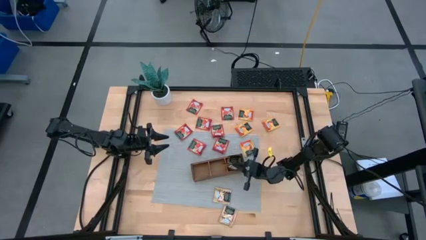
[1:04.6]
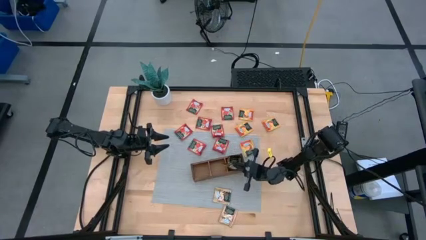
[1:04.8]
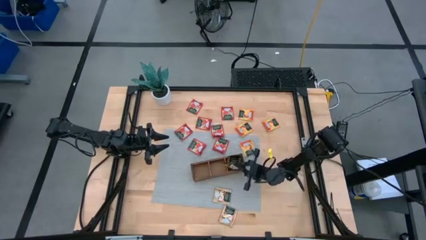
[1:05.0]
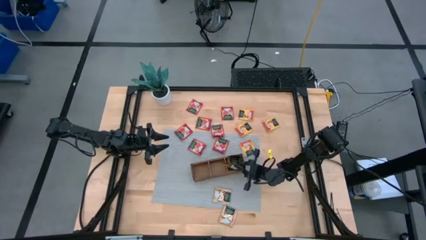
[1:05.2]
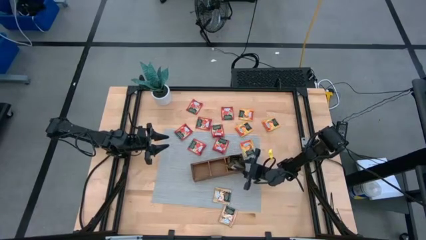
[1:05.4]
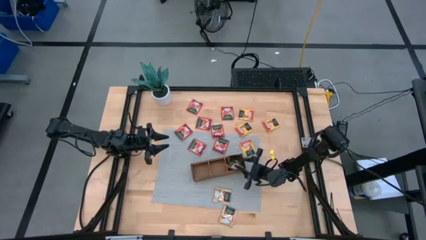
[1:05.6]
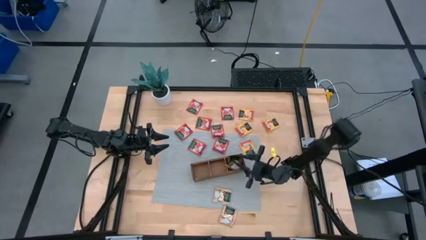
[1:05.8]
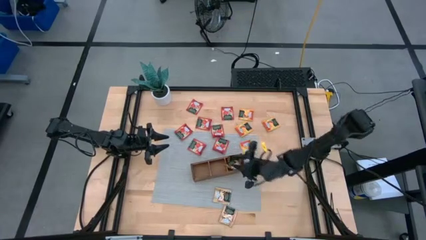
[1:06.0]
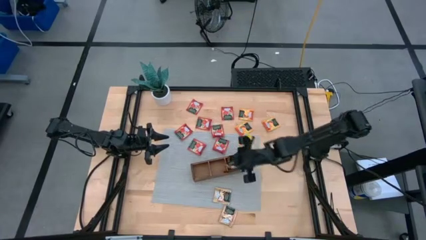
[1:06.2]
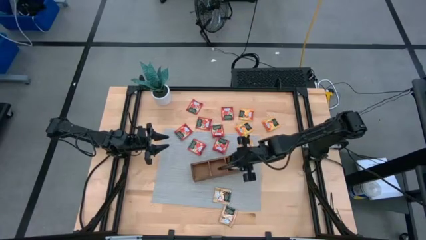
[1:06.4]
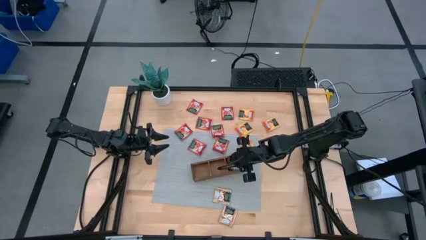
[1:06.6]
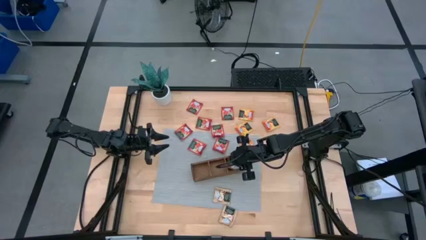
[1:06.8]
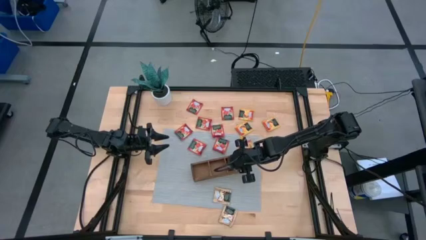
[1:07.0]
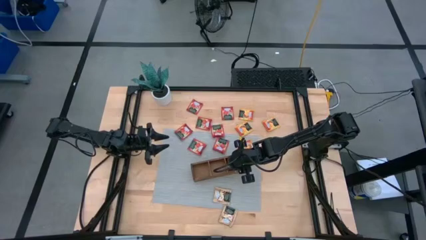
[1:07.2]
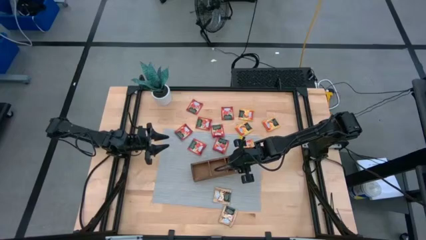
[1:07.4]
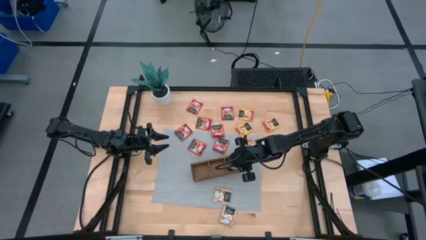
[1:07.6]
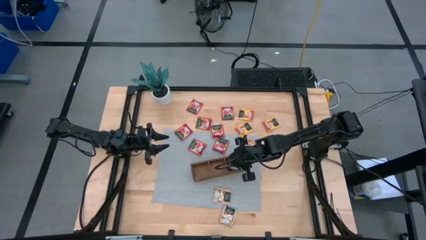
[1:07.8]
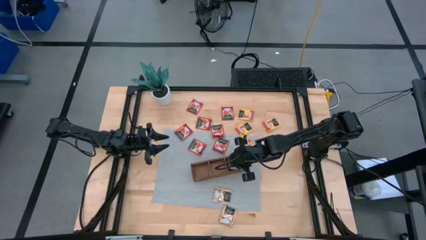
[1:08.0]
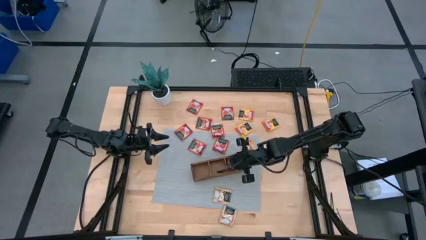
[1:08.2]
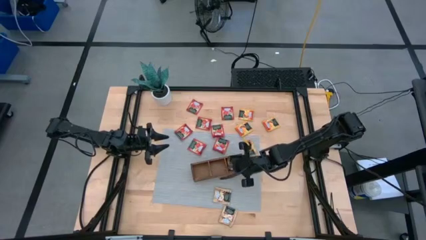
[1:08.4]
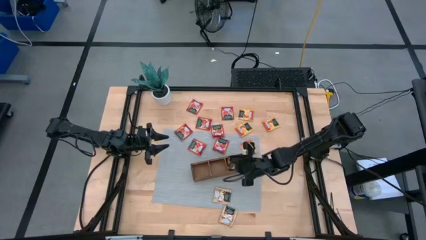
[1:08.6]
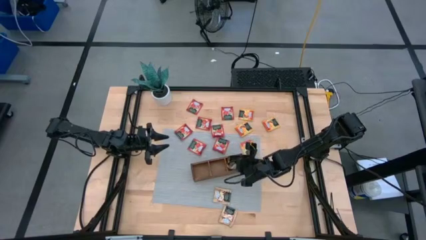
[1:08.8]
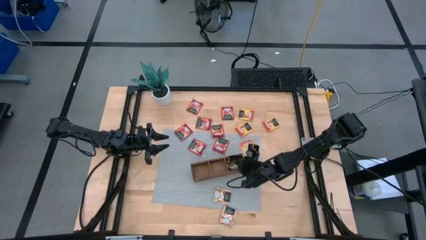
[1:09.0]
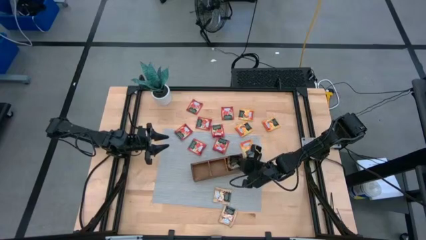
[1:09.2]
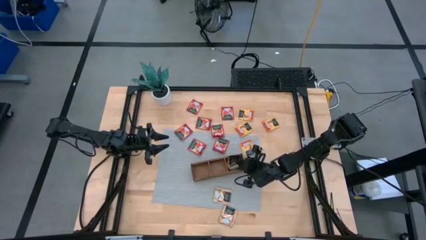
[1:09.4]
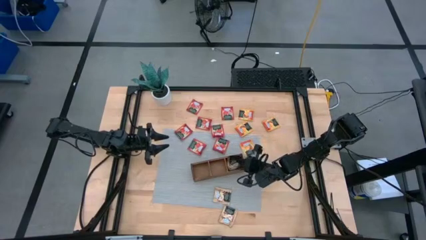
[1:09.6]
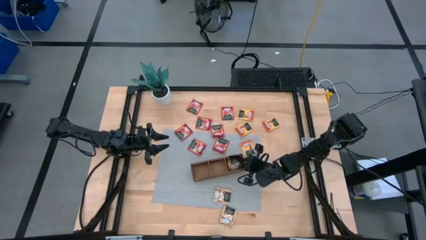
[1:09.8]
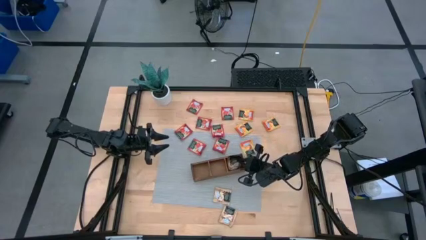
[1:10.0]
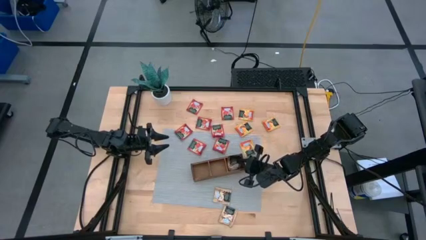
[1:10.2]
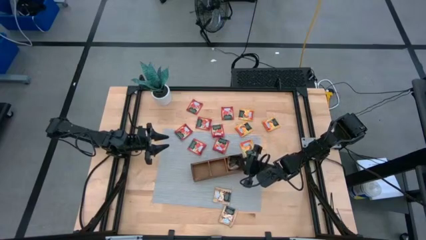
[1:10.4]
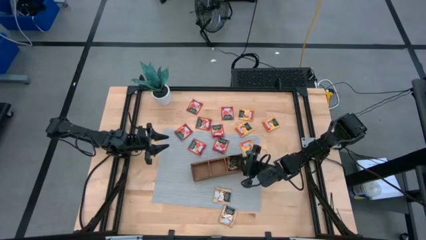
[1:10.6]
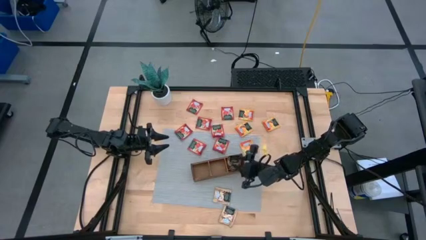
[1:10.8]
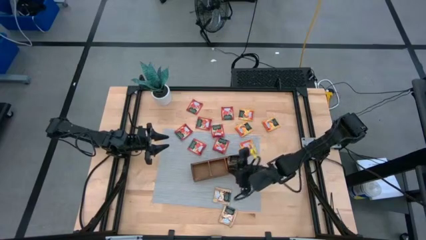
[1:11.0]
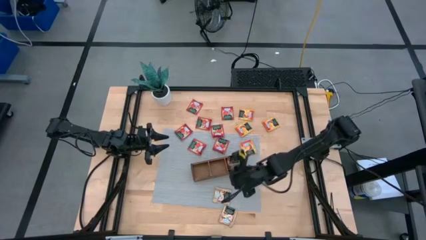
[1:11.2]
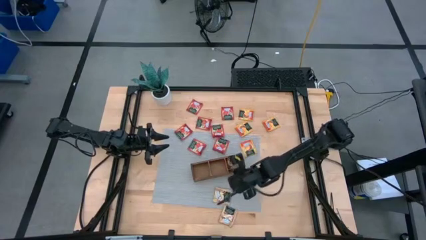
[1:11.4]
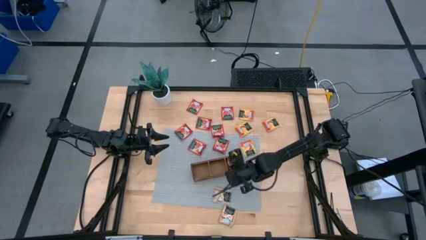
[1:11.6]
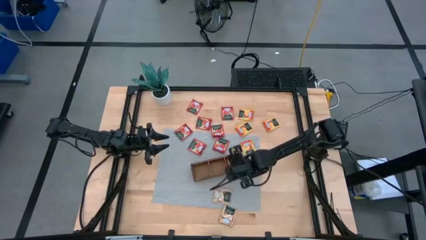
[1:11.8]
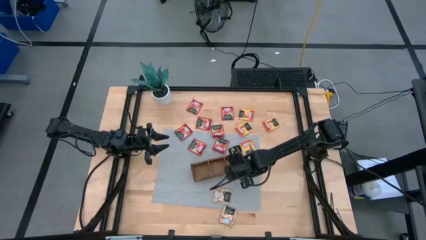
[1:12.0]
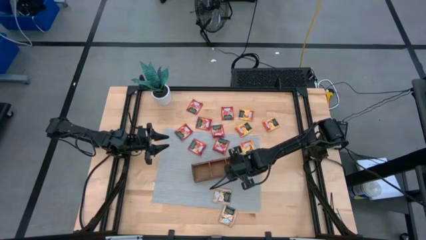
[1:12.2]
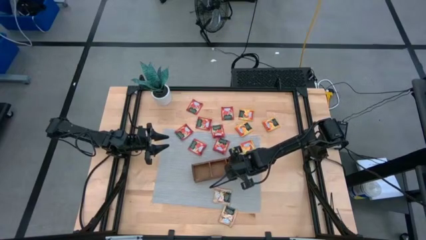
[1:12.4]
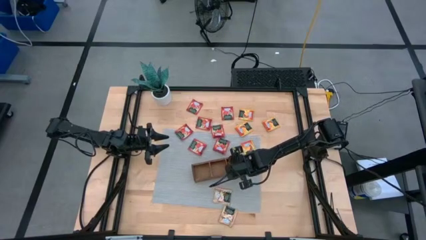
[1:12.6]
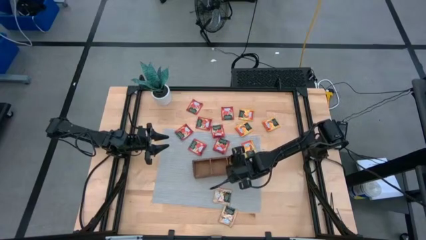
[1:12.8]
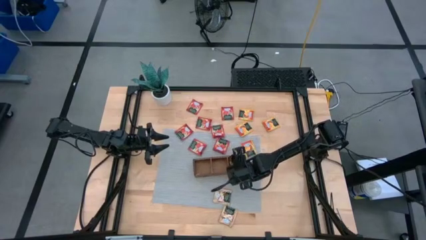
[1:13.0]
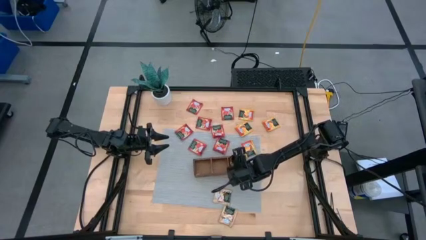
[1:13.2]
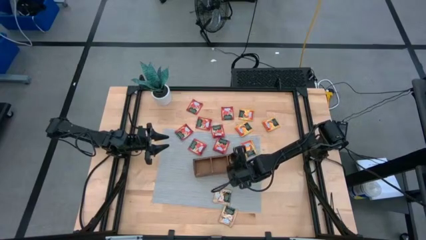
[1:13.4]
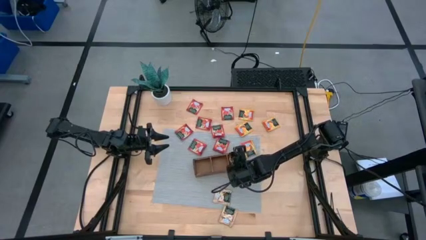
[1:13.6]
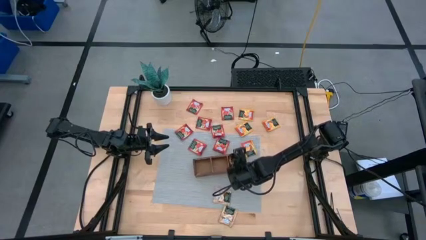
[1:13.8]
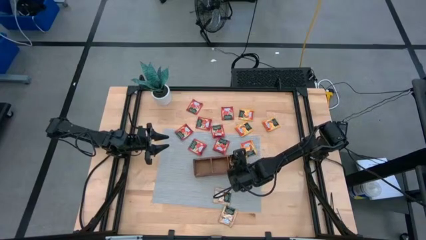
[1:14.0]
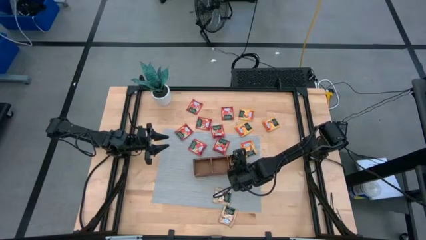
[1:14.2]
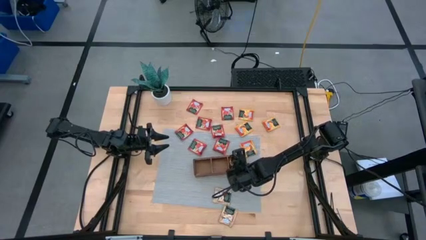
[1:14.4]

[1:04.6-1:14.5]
Task: Pick & Place Tea
Put the brown tea bag into the right compartment of the wood organizer

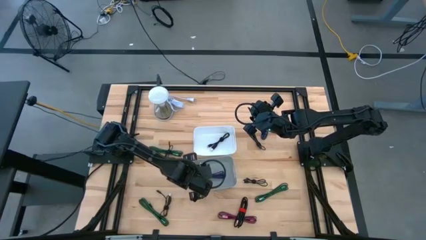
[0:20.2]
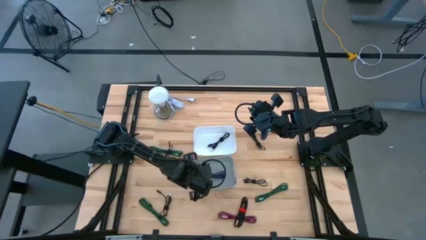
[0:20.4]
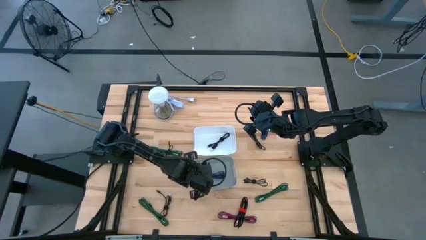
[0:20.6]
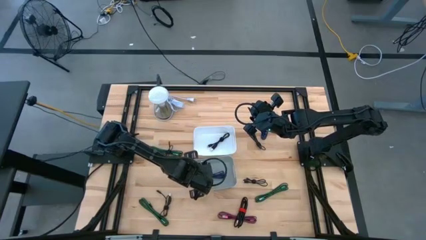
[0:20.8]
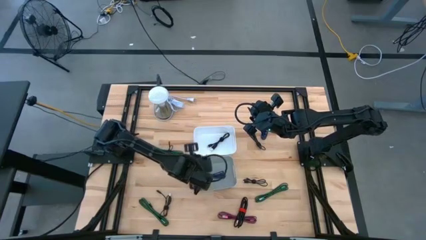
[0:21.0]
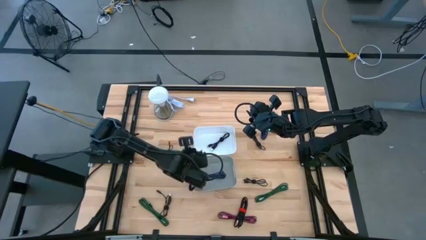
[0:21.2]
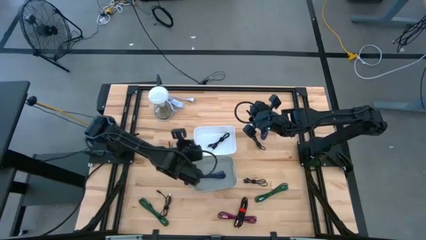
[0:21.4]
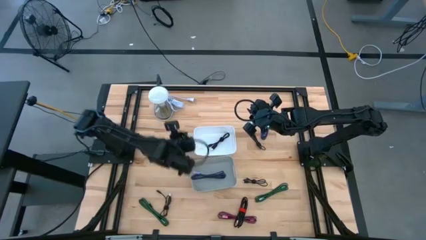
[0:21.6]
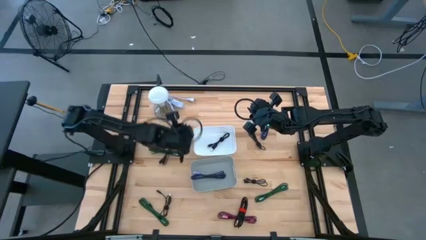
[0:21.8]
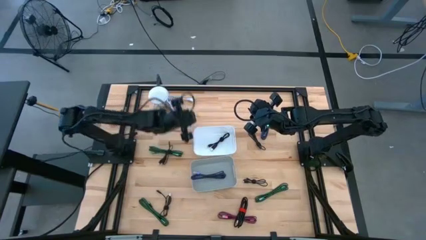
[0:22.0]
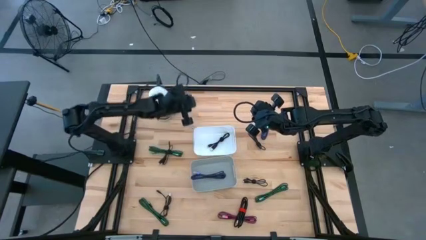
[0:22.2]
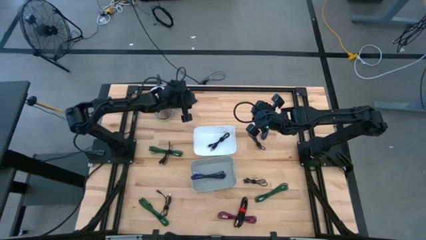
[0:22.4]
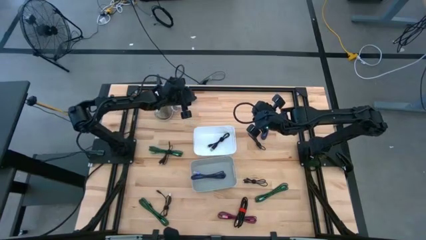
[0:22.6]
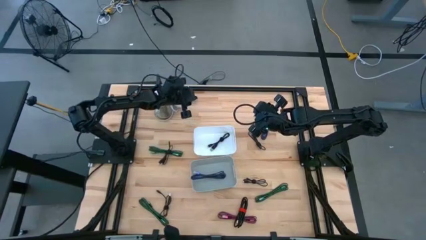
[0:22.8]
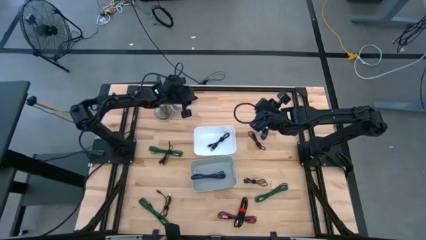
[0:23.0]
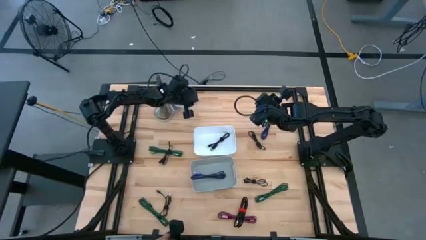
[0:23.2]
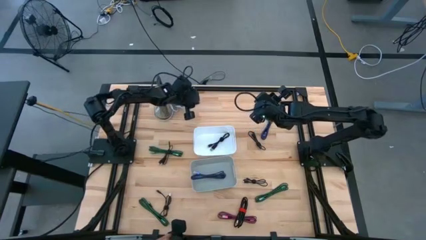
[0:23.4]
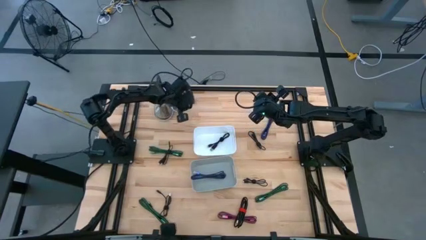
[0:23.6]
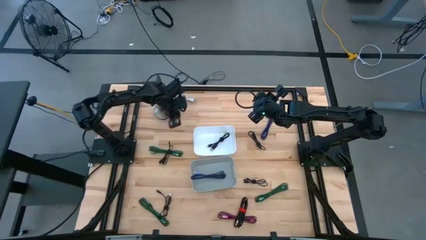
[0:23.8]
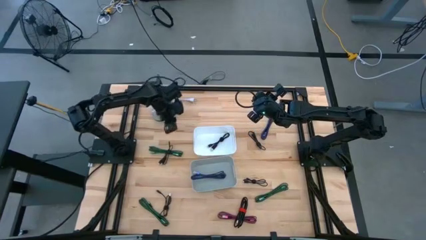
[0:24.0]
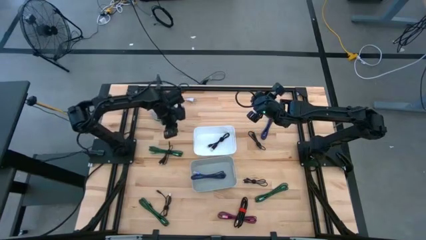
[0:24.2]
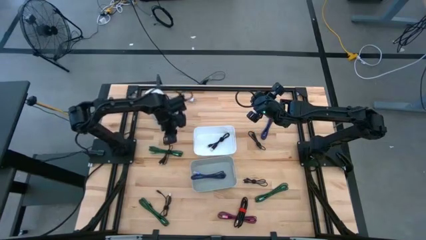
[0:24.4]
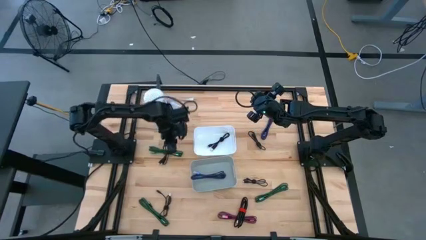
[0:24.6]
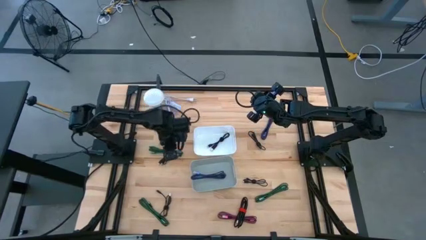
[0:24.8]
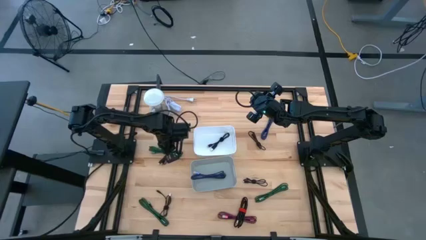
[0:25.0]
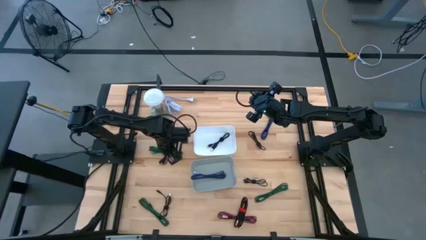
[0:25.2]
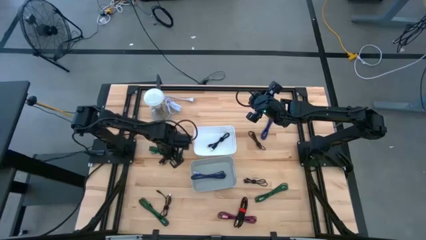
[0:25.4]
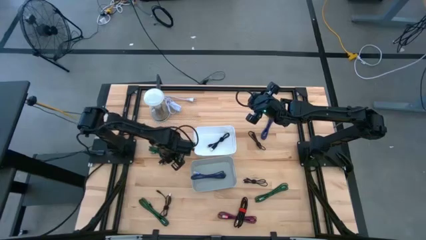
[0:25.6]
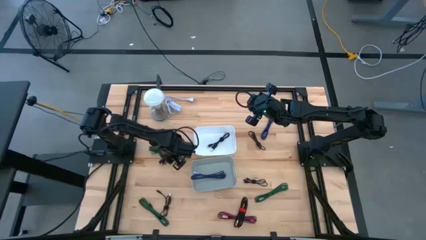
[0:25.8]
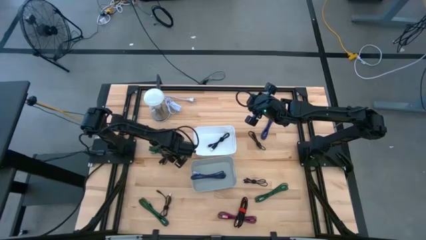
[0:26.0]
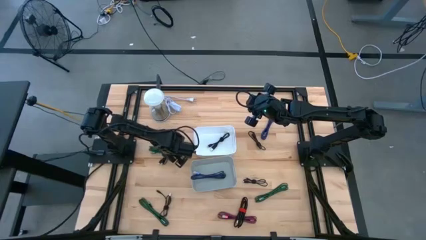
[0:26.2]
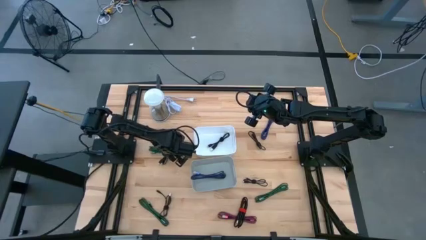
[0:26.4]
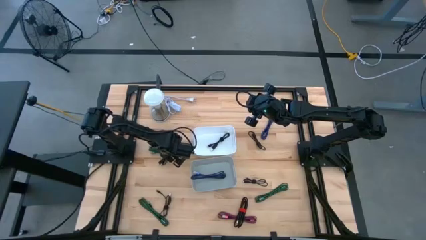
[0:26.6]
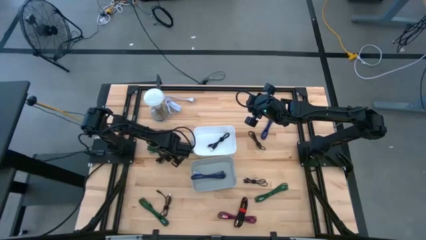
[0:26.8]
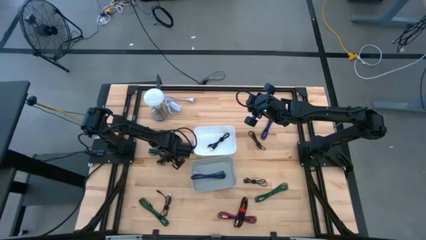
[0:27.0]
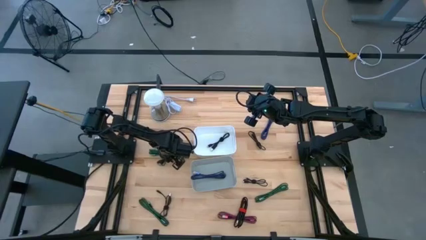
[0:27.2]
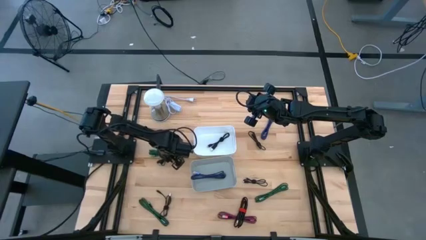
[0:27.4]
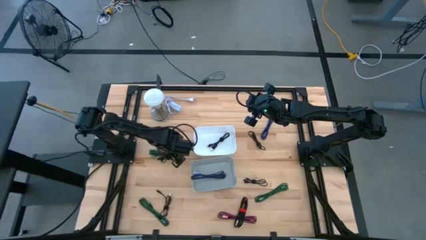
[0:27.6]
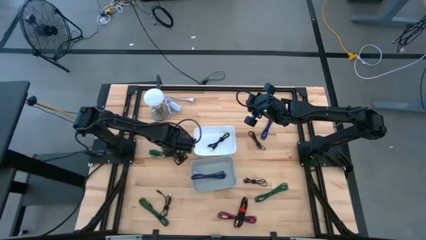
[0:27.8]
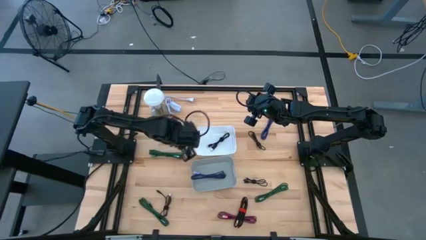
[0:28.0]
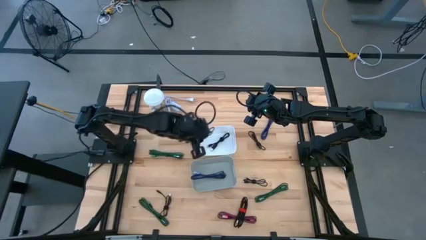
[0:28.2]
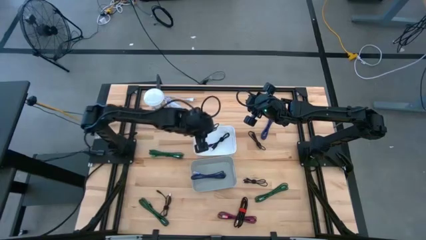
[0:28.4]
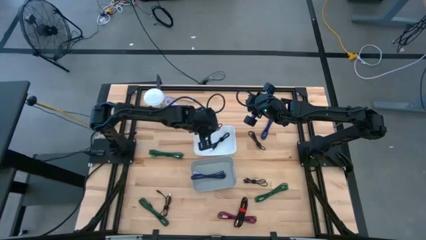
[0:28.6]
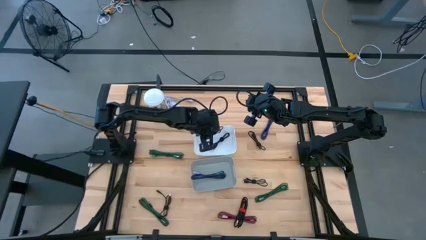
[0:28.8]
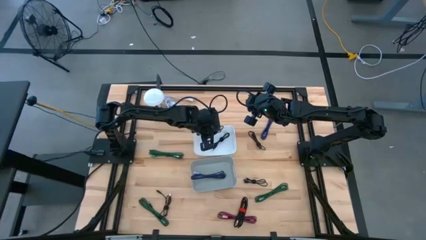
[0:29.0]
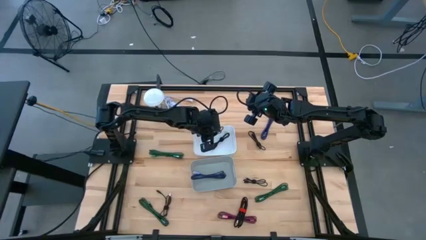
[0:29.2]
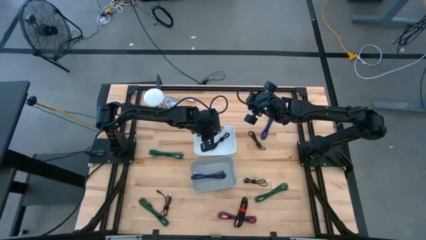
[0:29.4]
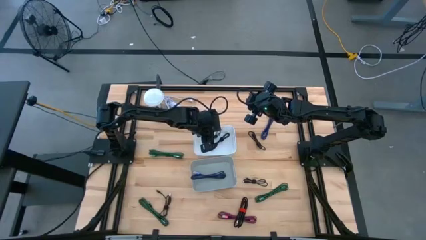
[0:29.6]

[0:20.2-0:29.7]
Task: Pick & Place USB Port
Put the black charger cable into the white container
